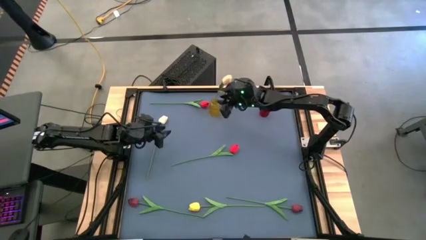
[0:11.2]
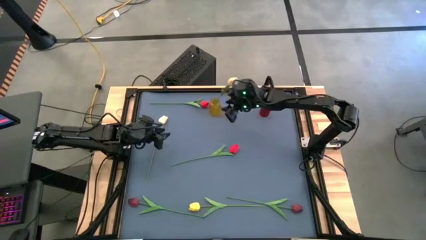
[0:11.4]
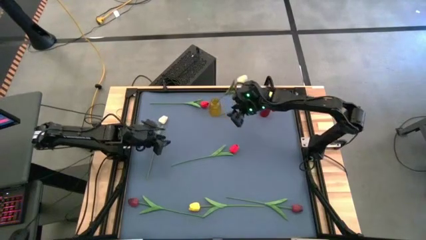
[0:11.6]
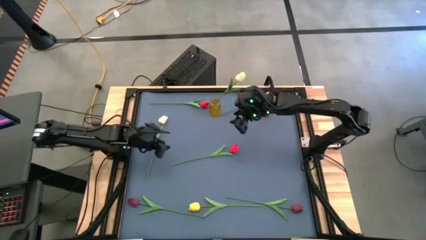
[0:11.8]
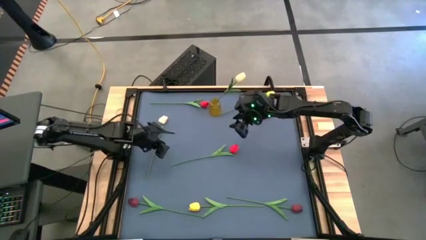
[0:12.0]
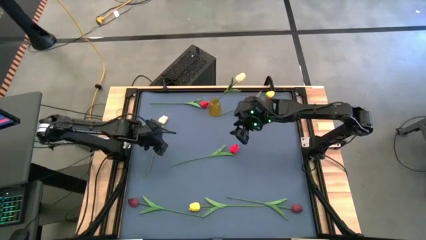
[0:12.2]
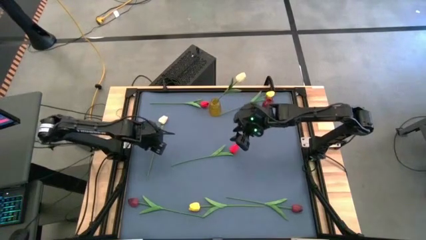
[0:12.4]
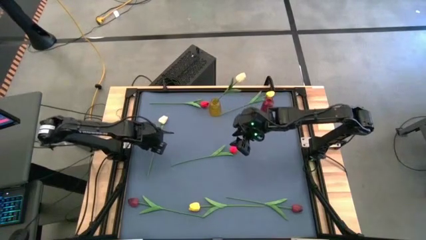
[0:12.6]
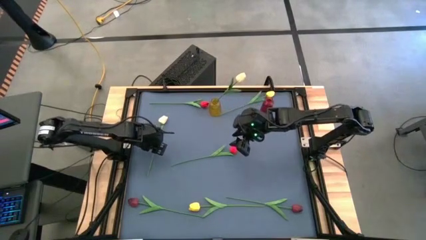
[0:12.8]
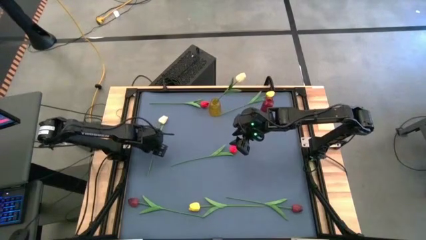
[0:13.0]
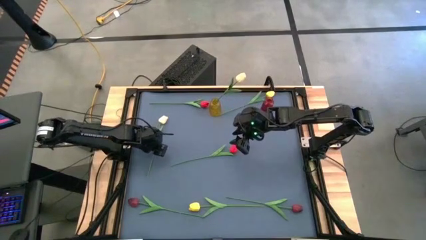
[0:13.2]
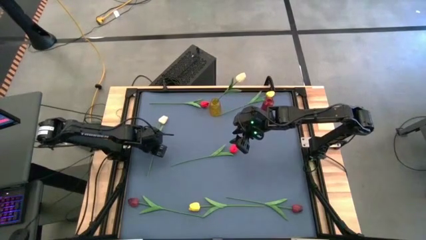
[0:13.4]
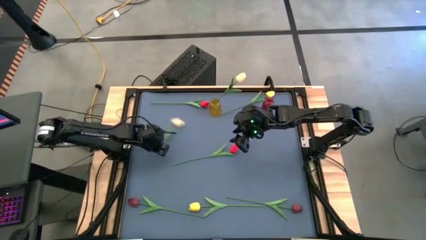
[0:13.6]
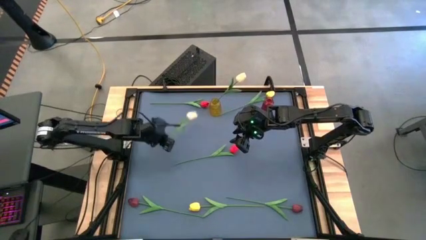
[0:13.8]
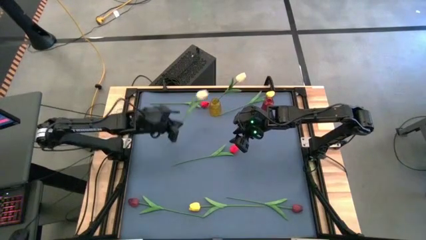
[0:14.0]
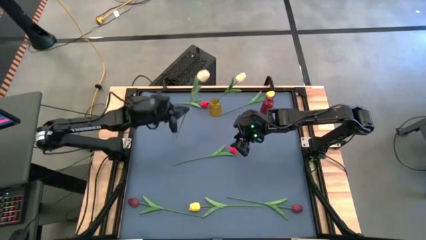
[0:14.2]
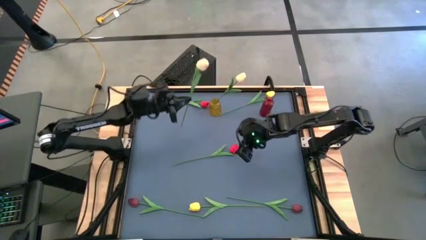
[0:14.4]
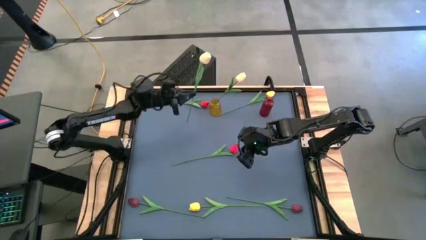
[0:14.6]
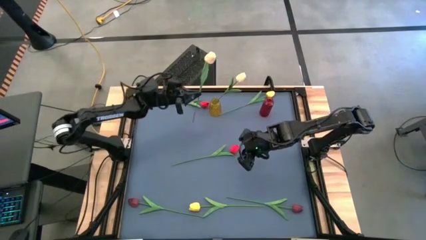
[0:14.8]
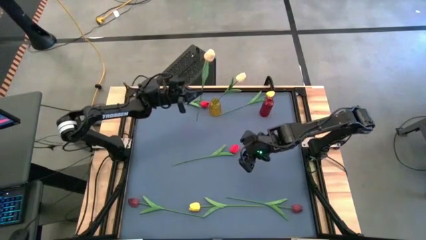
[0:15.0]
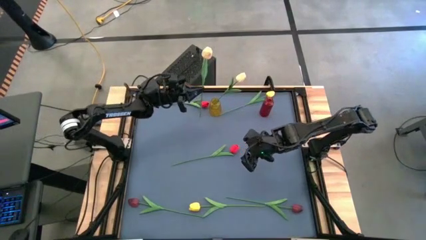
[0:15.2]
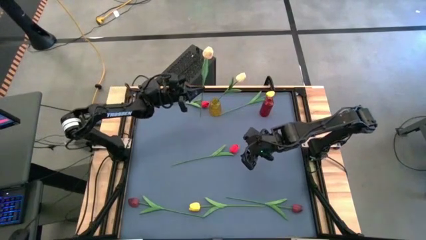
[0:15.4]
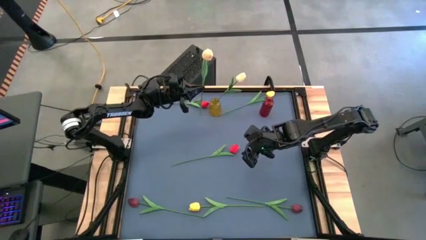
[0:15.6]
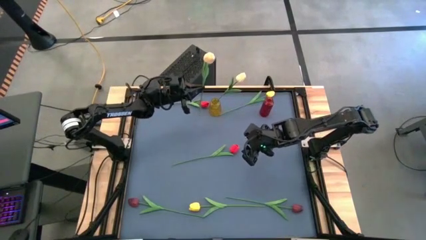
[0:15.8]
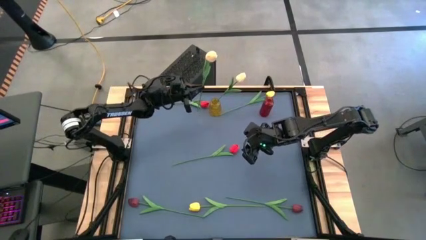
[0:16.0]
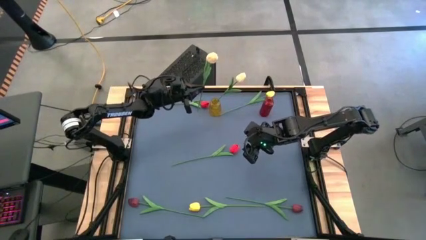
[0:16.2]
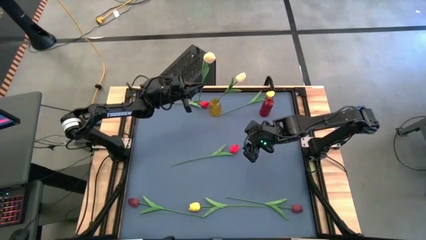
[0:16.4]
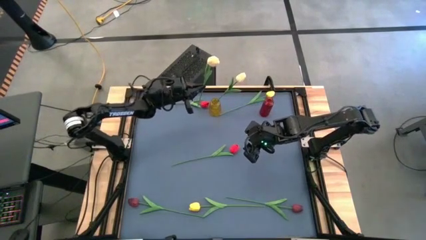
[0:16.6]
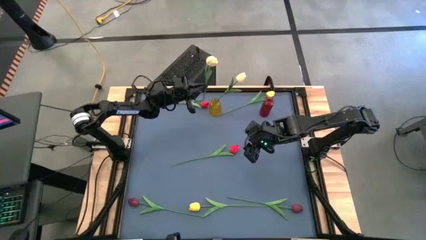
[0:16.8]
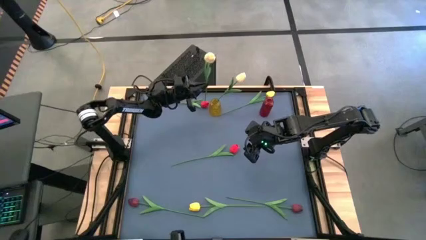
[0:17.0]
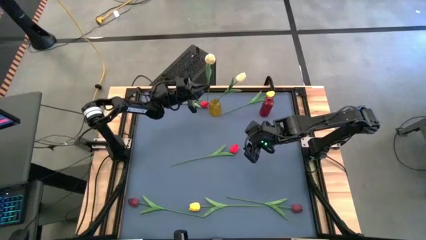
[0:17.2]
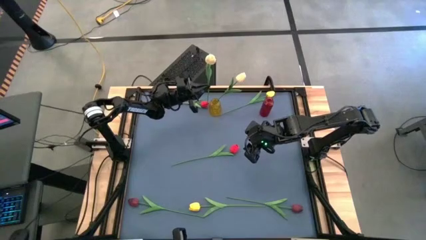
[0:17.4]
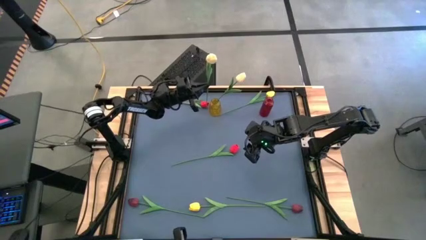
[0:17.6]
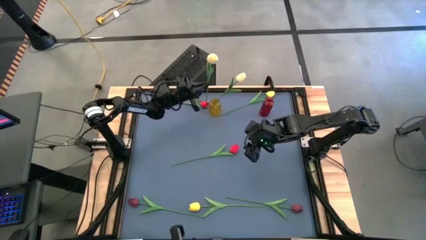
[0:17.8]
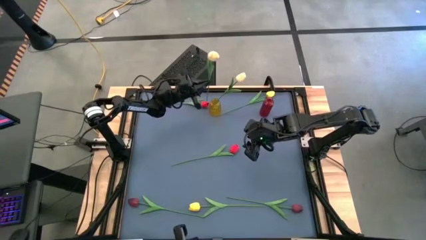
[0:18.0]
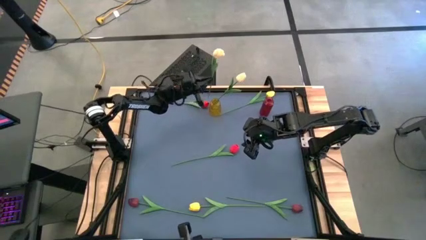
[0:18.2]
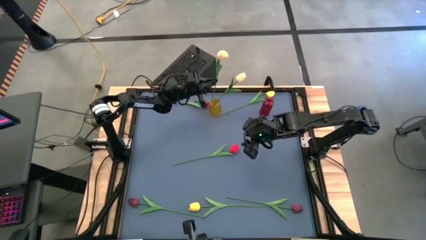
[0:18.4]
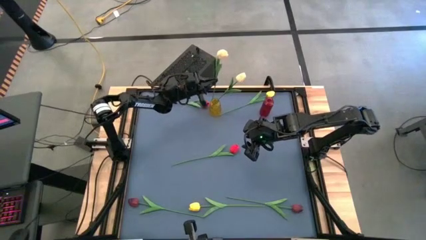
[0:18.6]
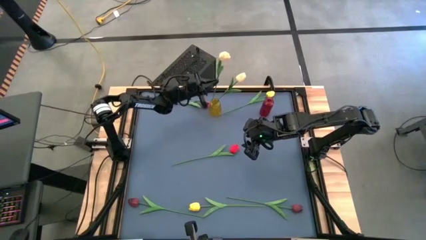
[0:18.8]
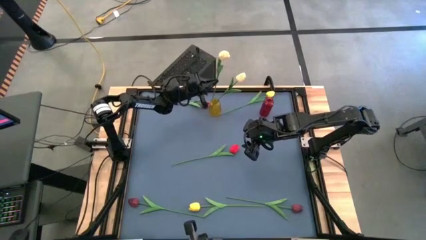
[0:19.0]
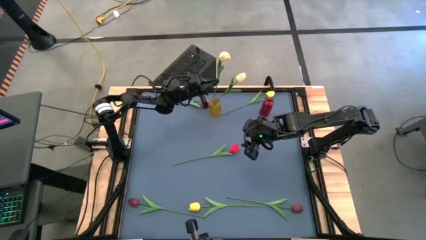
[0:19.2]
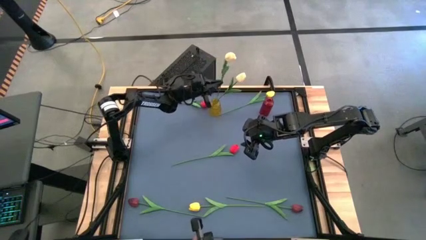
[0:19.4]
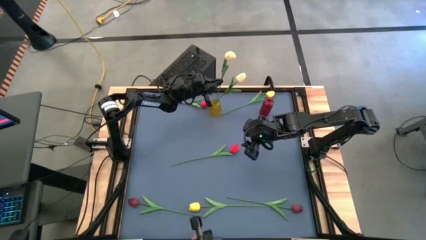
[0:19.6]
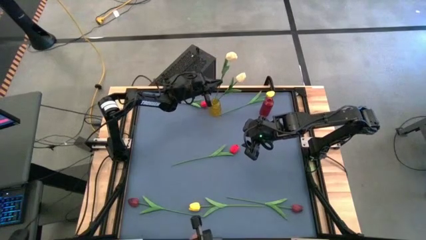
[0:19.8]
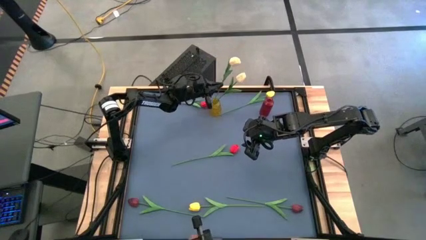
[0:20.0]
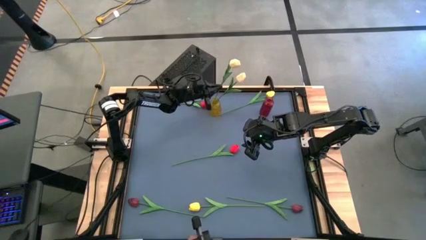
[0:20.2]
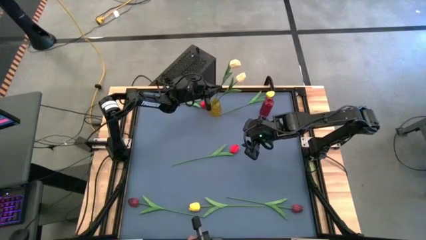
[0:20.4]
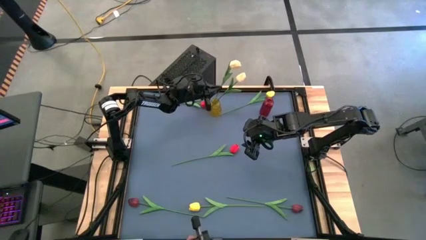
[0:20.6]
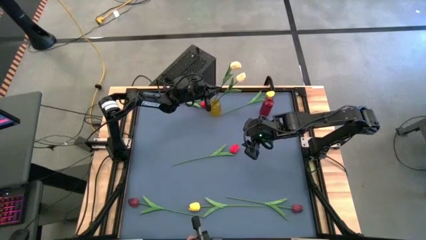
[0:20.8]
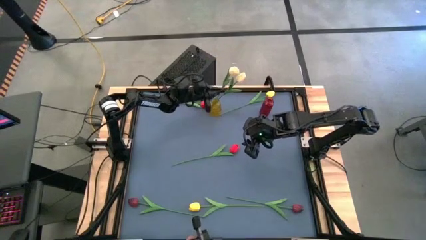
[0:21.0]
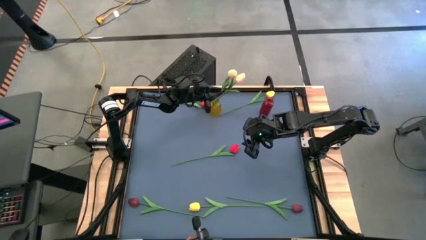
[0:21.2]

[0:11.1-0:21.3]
Task: Sort flowers into vase by color
Put the white flower into the yellow vase
